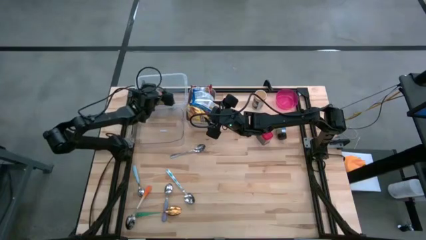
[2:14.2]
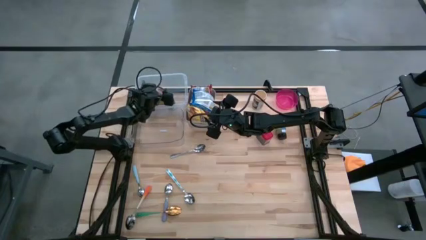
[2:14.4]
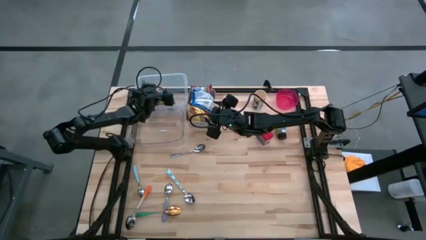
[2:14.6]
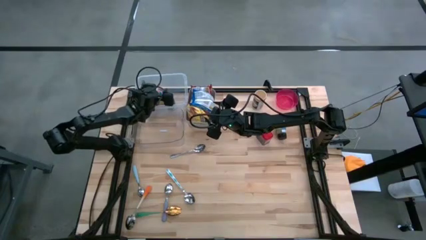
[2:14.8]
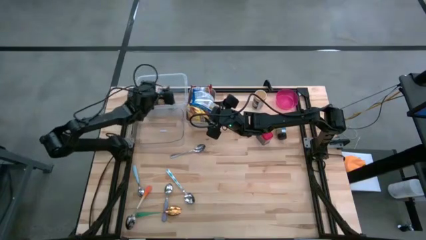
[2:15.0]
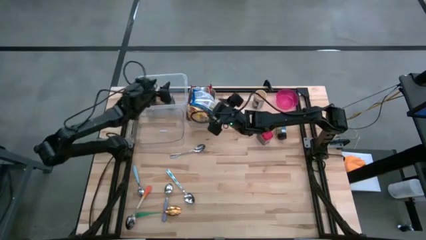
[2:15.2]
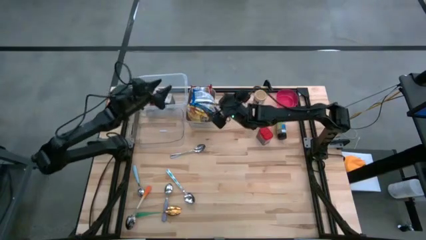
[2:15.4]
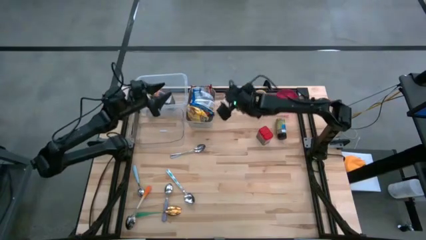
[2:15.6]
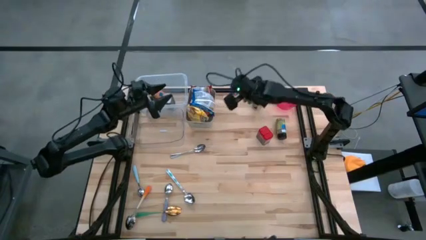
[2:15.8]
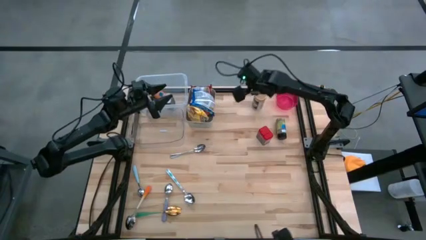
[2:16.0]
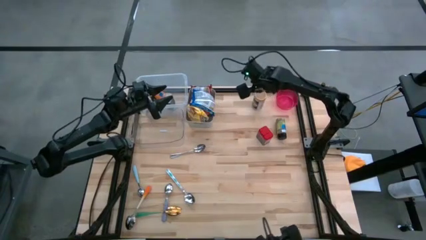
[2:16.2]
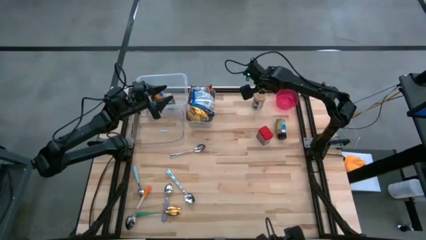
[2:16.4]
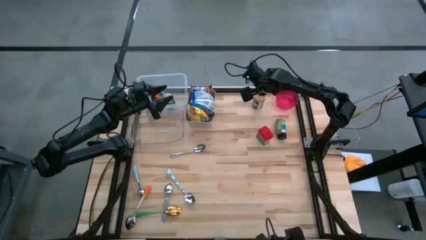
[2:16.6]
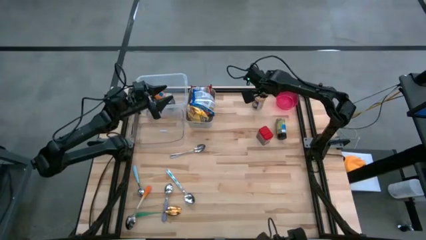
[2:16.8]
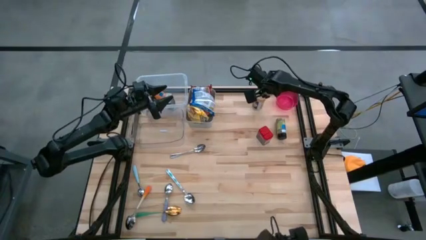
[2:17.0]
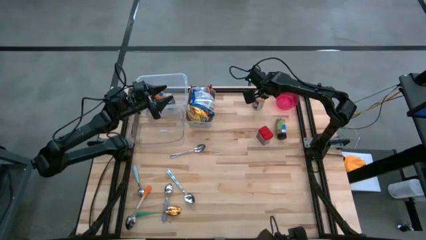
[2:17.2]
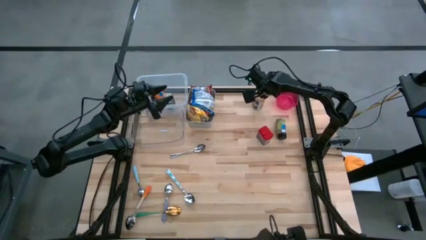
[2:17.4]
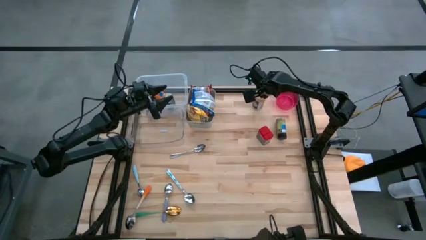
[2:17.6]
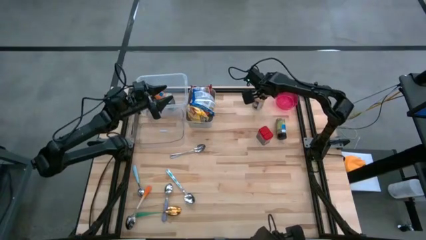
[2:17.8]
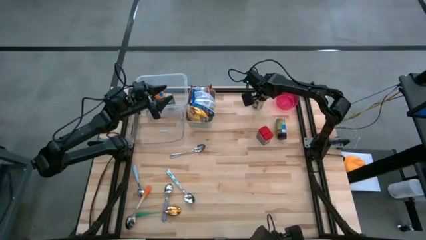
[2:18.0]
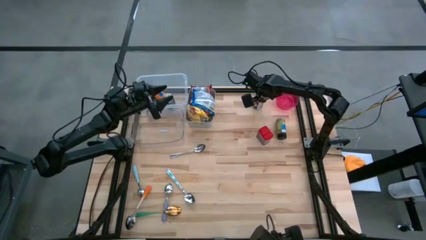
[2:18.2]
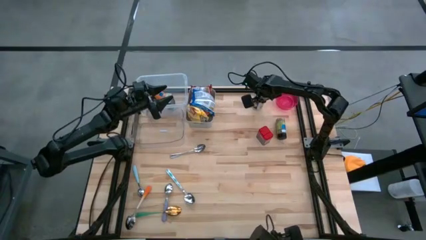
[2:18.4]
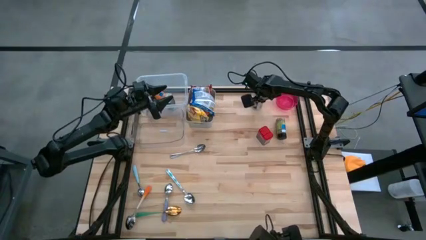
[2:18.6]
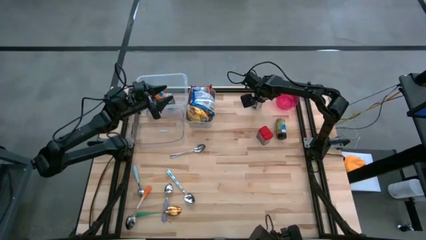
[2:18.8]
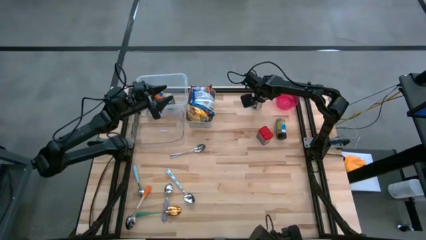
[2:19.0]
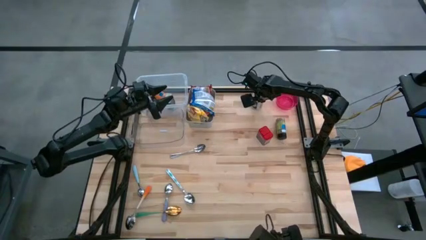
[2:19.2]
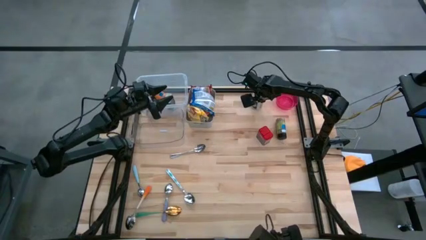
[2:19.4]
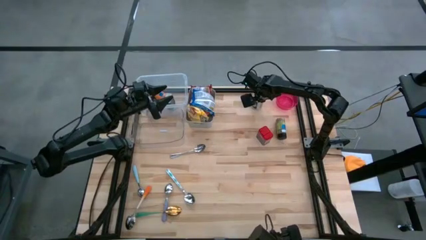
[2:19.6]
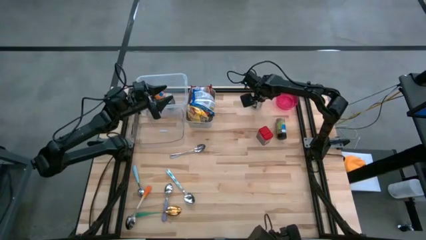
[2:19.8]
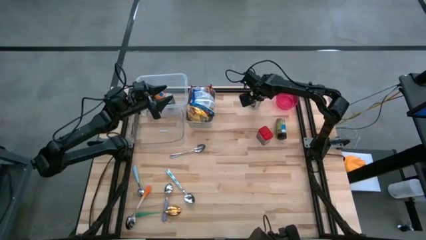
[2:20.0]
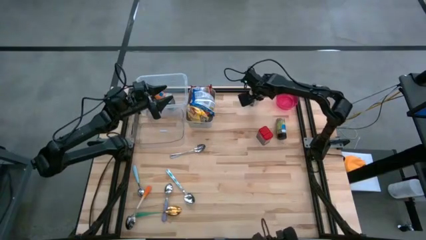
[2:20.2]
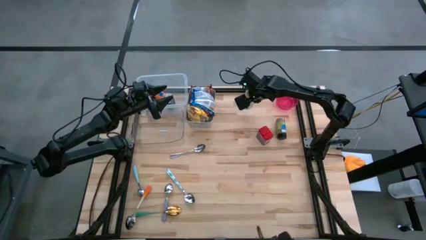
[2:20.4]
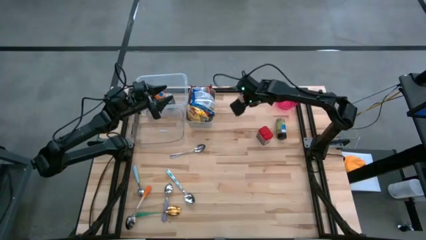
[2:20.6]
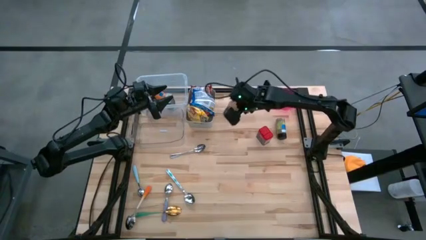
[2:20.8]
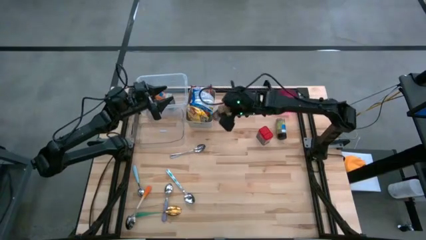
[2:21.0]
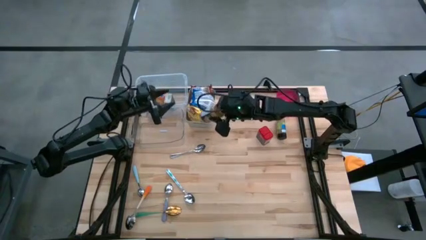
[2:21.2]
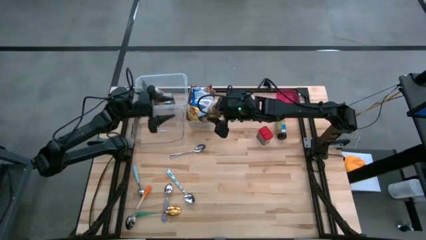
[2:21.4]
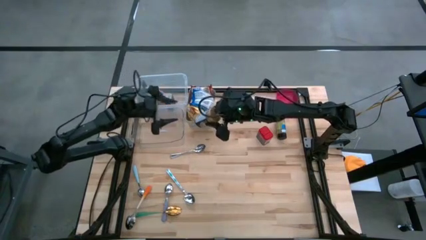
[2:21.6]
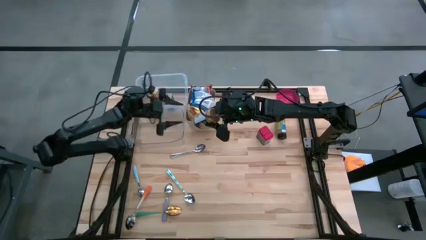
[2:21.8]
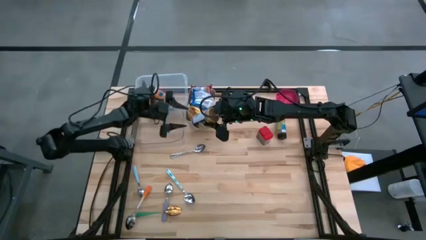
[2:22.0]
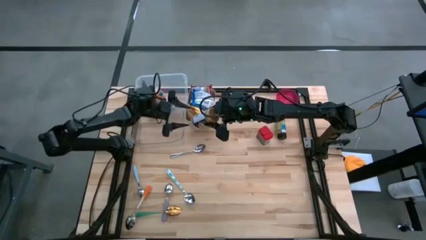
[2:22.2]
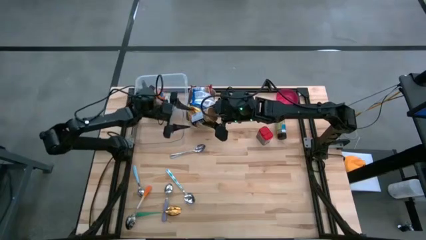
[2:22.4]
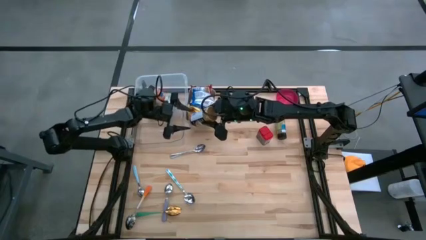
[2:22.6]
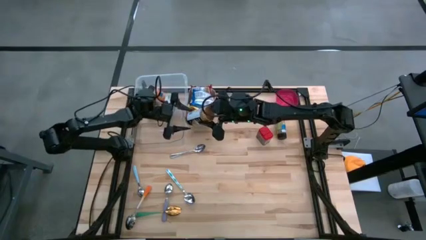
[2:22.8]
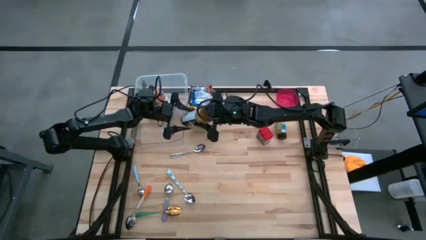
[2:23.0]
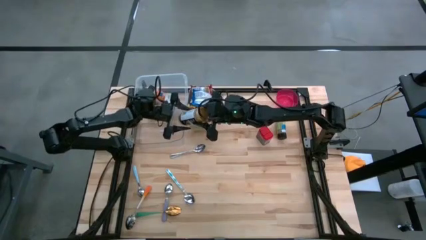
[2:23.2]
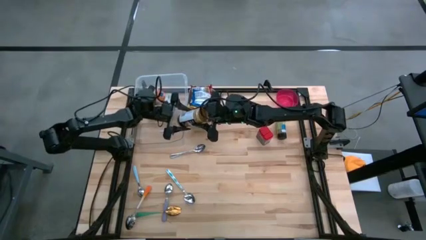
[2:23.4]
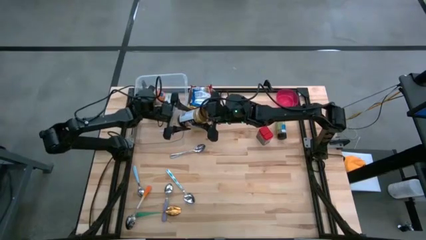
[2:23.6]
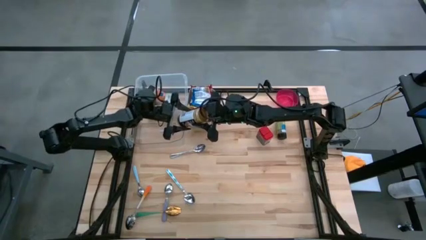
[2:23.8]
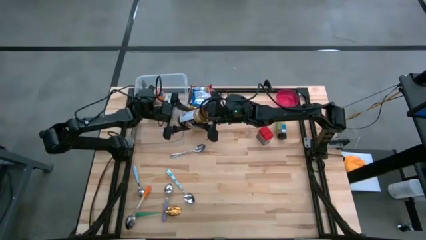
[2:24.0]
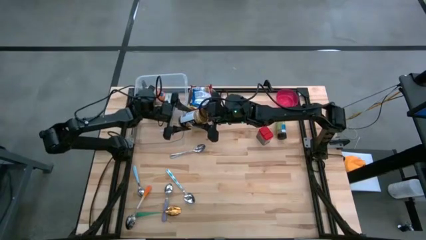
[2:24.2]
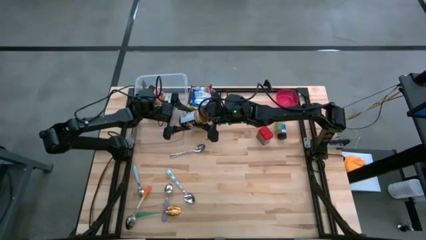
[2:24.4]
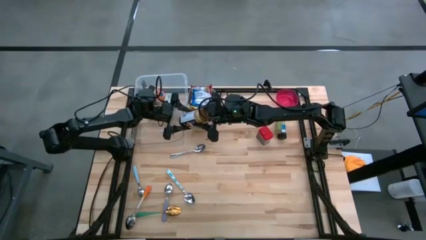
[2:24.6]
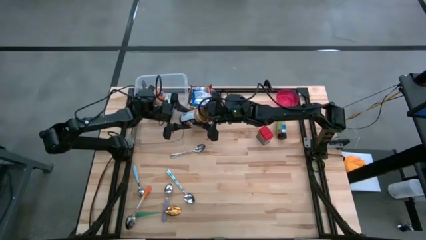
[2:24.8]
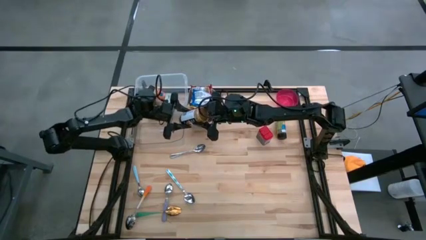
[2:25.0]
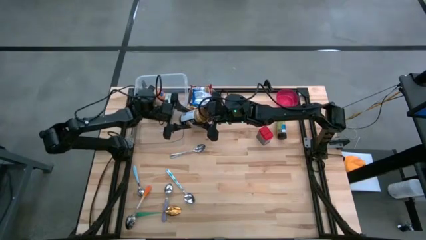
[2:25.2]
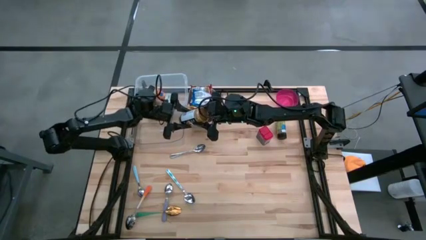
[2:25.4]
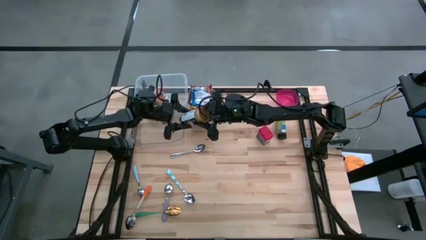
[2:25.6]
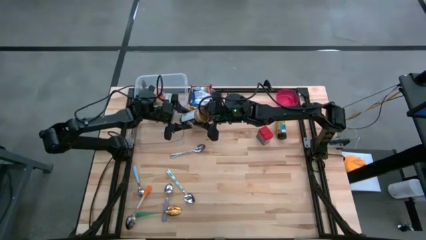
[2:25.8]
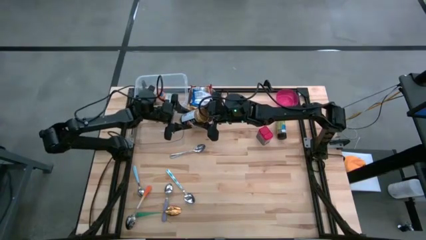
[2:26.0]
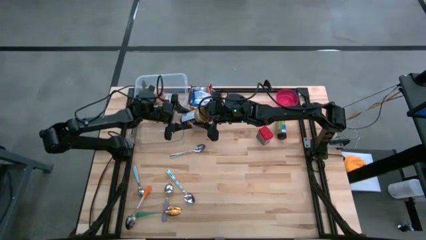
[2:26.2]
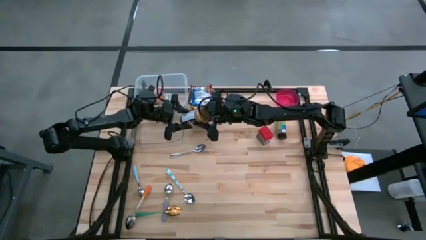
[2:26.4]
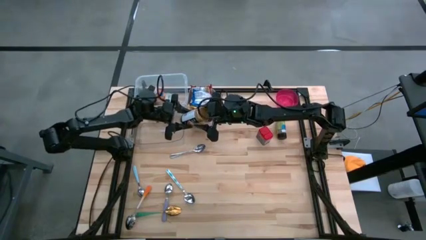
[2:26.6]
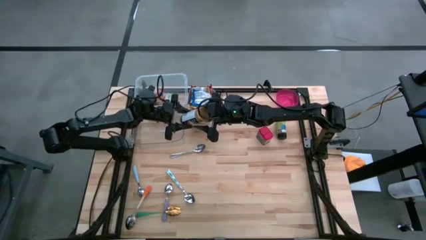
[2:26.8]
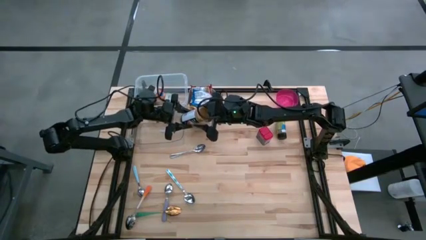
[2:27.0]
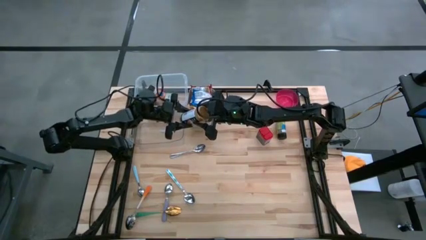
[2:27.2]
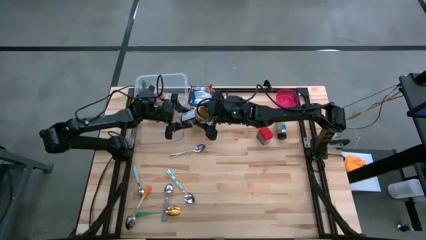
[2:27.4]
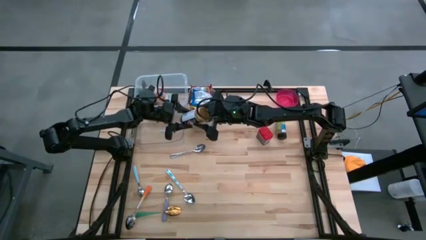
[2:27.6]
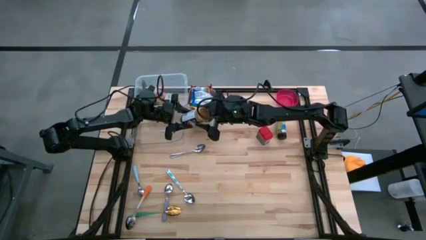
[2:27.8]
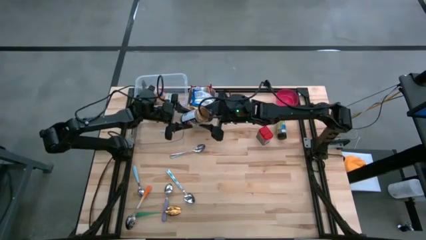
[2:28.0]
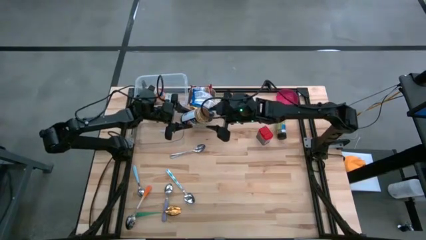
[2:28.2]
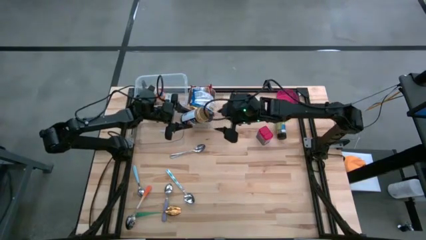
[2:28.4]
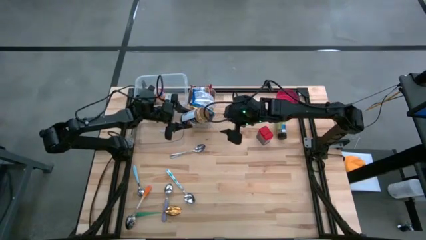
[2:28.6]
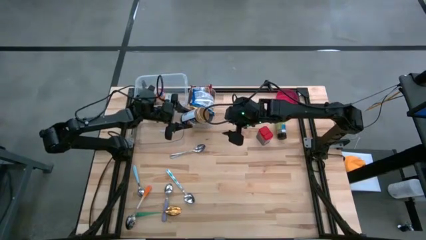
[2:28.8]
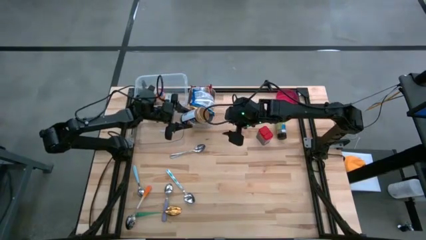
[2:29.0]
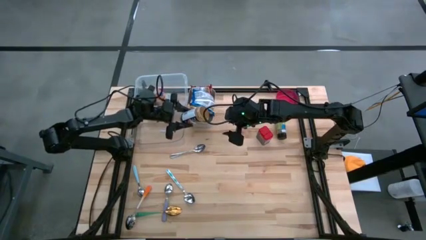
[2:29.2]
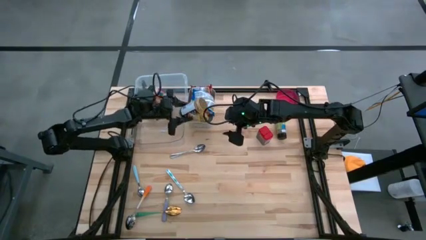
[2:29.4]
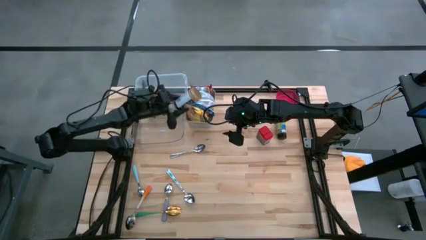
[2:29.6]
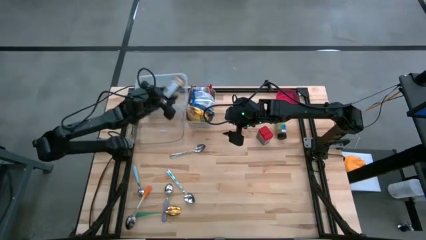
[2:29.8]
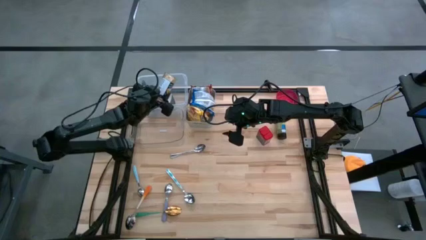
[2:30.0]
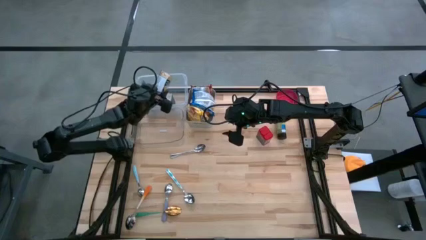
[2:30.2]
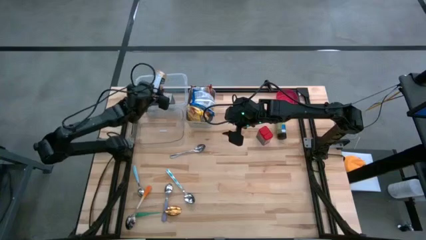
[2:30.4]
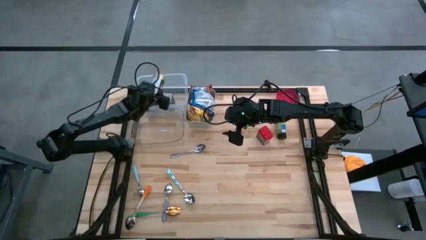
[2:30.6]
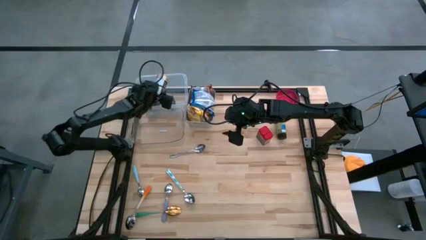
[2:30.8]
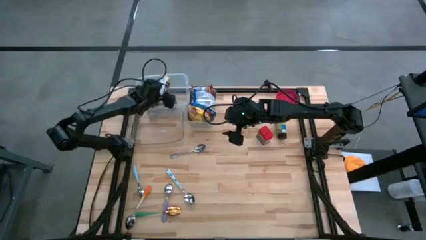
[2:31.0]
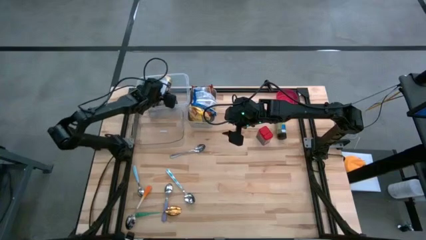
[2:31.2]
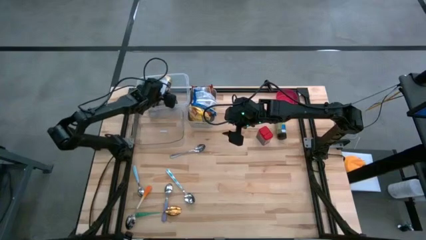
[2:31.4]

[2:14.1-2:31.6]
Put the golden seasoning bottle into the white bin
